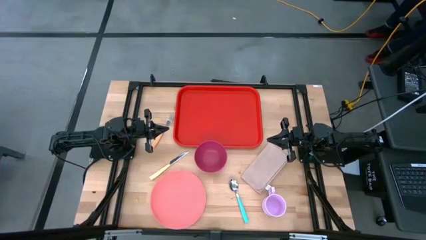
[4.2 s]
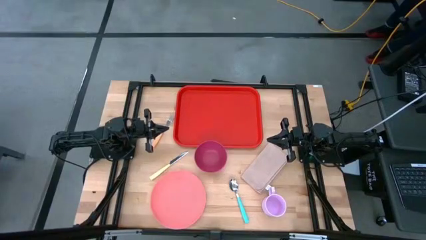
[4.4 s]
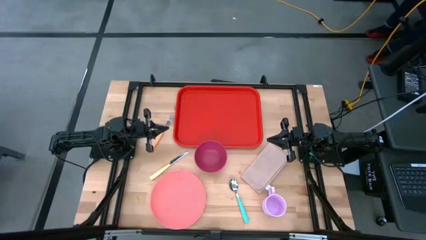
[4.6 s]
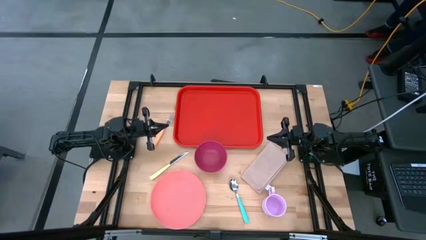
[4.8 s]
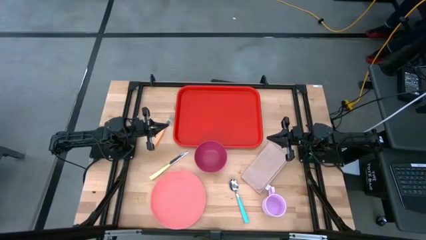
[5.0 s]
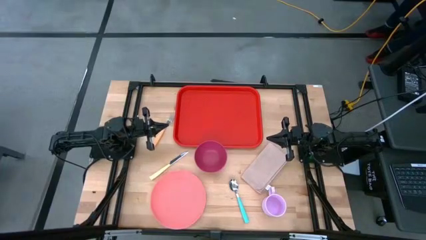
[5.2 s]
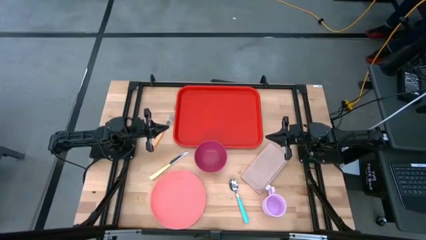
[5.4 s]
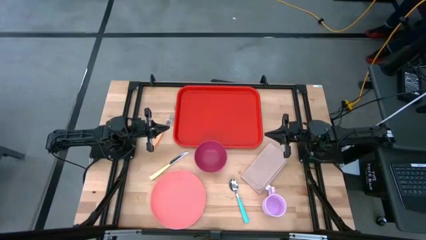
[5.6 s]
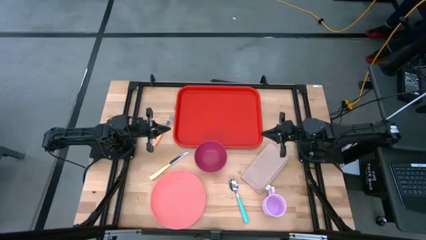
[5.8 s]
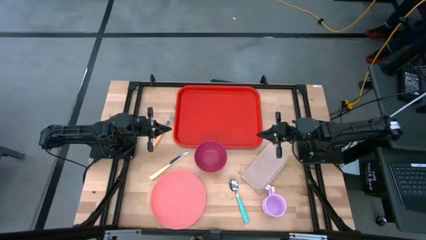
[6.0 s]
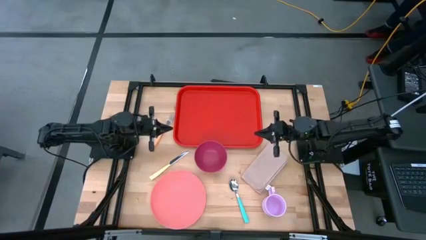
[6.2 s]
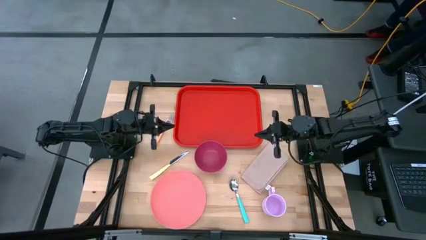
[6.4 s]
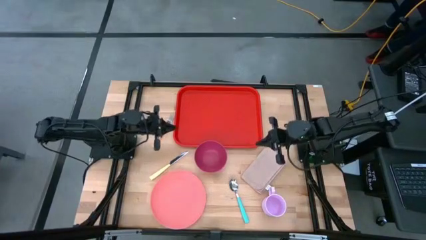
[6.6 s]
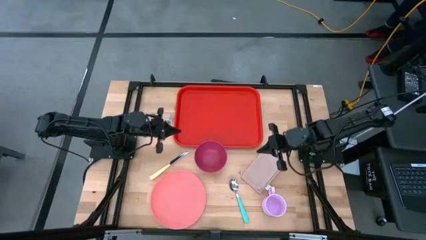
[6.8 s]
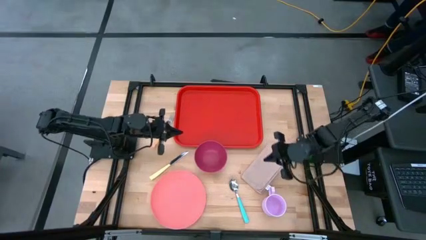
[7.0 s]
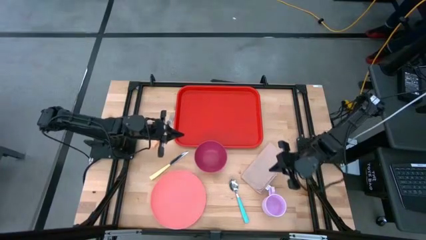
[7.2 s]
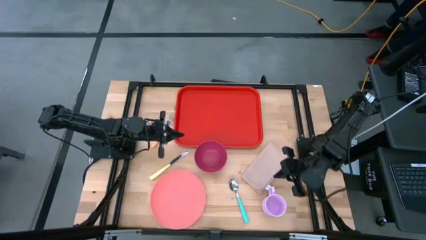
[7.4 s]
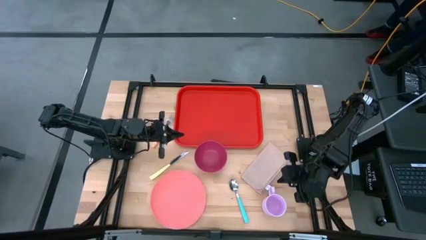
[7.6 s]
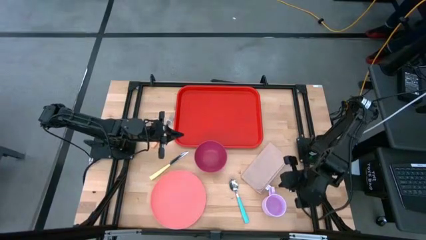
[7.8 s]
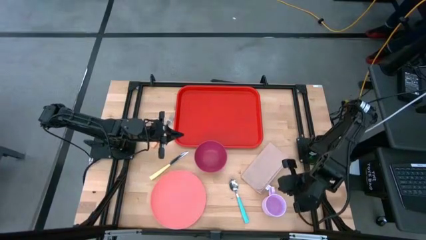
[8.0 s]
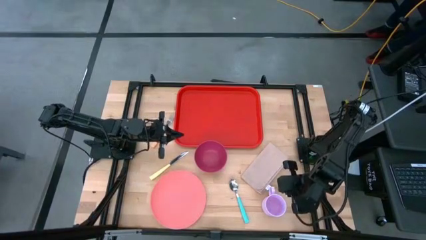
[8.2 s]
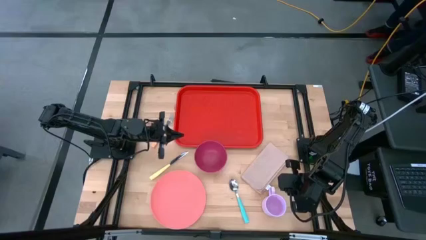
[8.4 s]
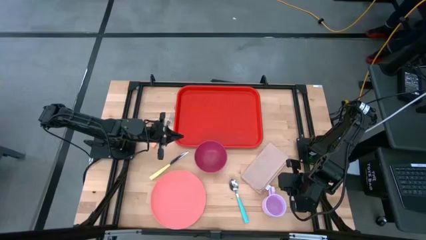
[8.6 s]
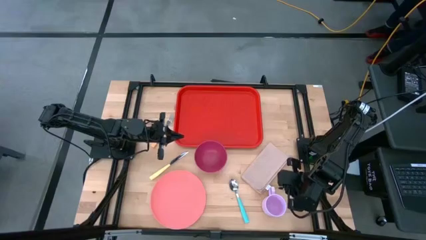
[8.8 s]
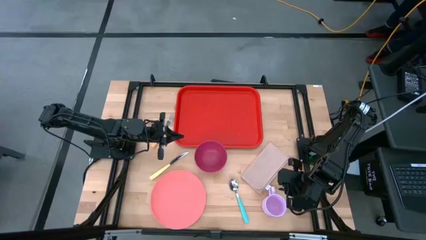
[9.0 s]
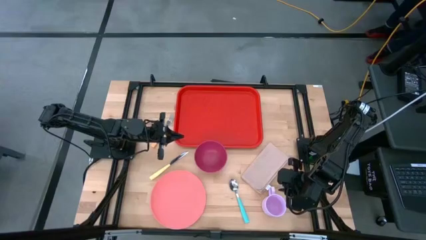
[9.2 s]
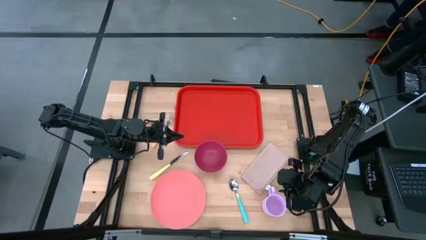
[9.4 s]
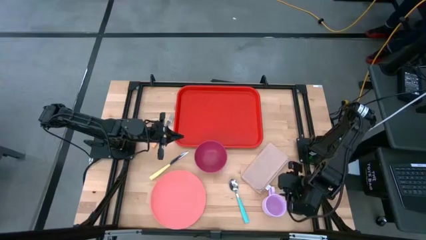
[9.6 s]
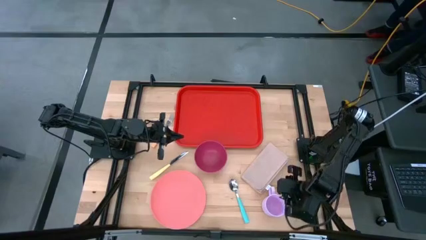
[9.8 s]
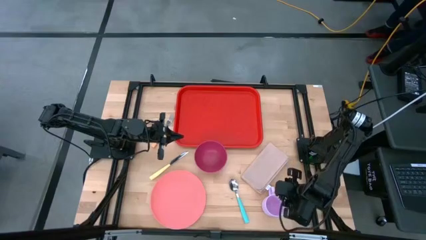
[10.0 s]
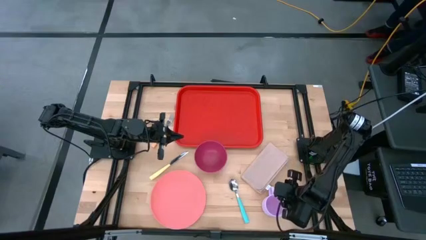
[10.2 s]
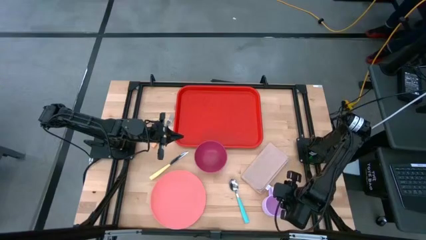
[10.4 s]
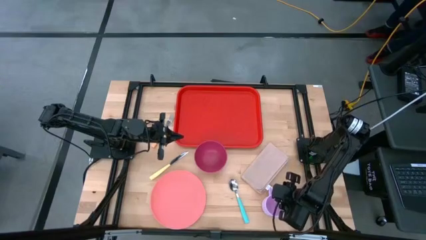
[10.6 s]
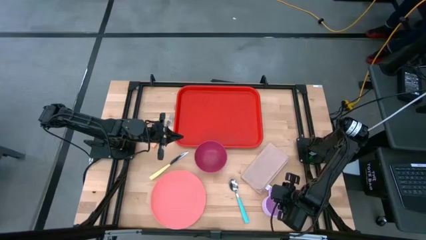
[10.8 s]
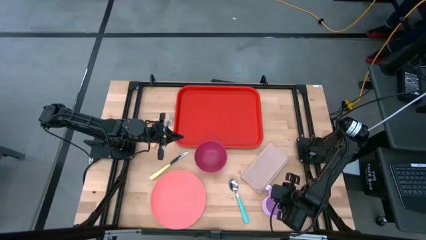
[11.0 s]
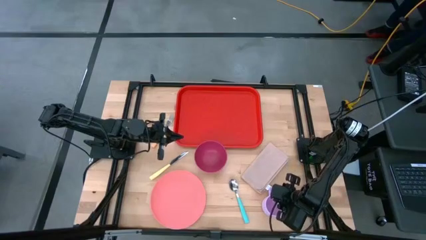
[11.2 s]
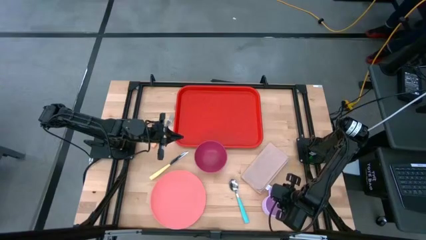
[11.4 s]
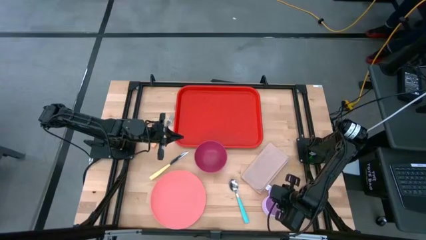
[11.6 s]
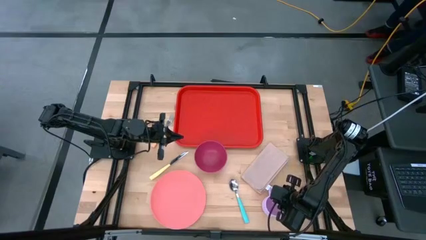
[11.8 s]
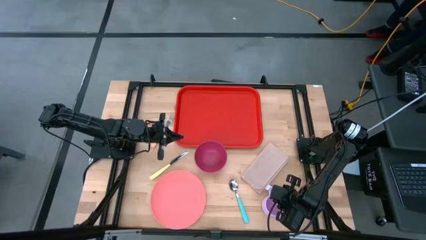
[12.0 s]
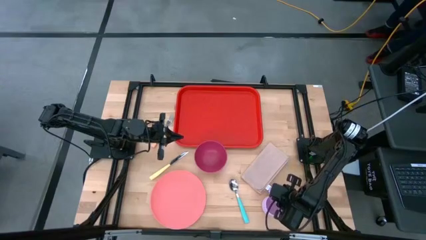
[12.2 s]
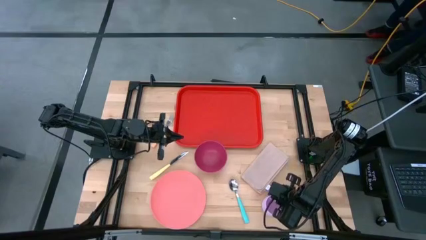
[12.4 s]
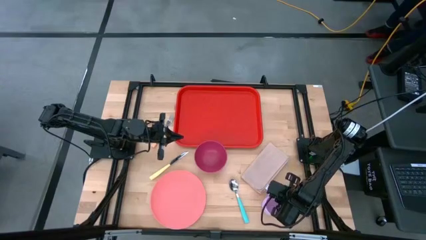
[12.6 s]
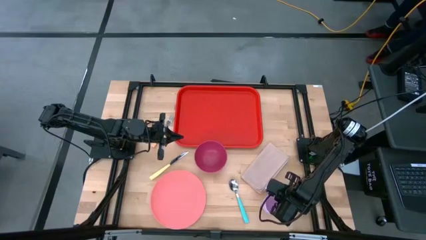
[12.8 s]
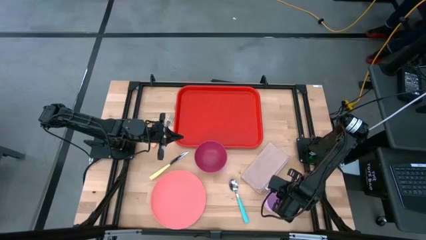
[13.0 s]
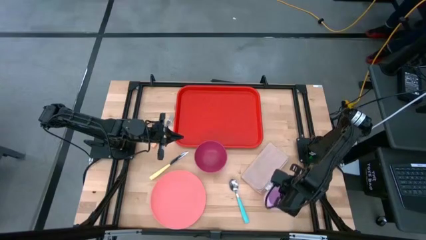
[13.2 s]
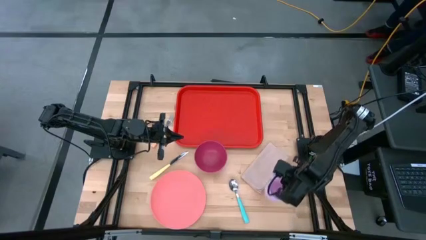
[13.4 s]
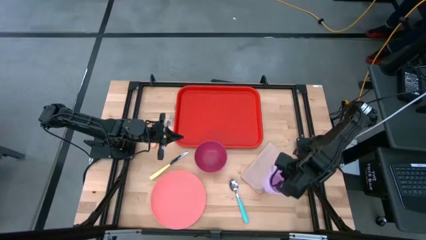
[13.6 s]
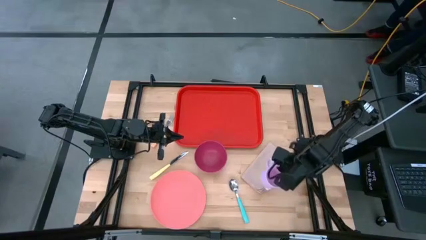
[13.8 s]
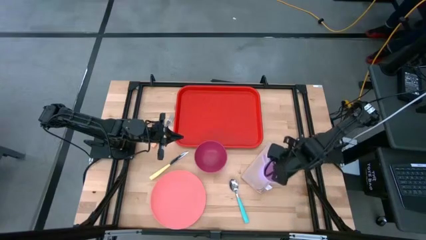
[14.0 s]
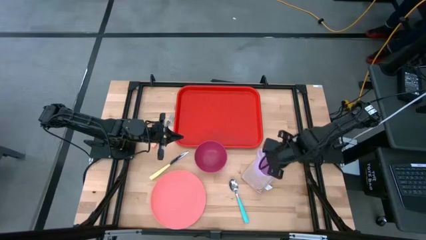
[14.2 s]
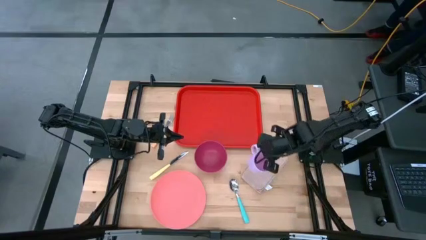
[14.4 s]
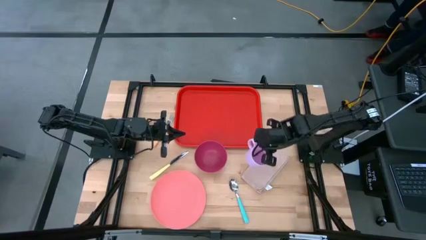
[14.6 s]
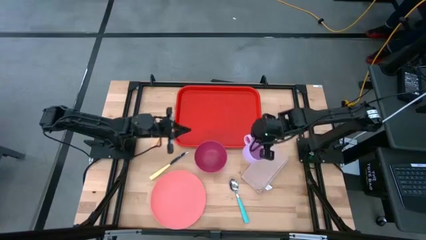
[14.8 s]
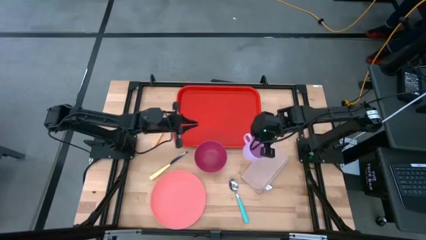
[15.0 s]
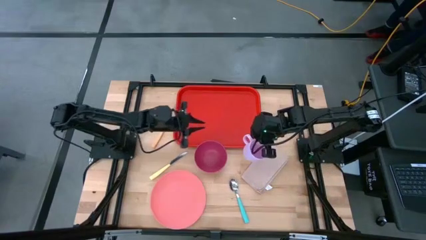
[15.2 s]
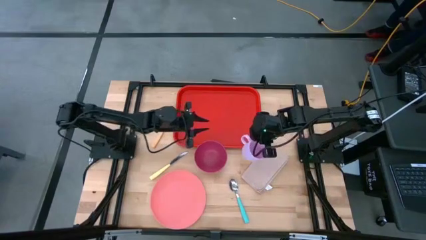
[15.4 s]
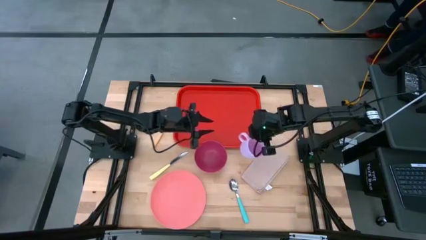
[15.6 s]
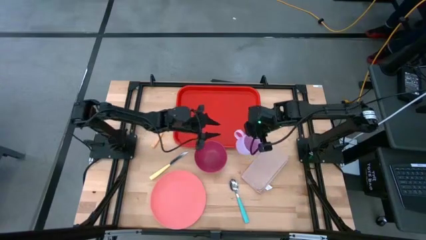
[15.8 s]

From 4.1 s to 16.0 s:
Task: Set up tray
Put the light purple mug on the red tray

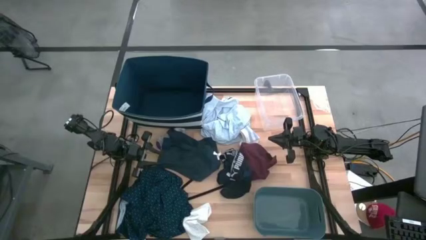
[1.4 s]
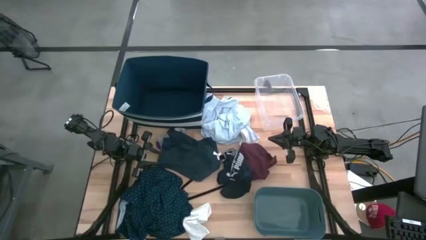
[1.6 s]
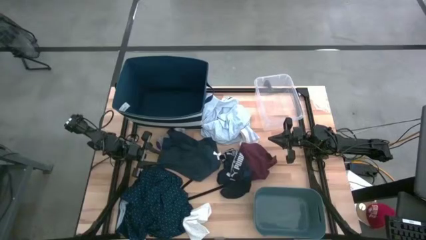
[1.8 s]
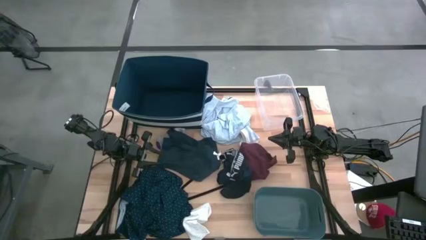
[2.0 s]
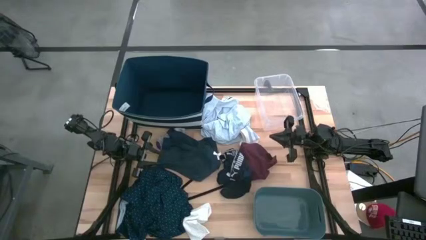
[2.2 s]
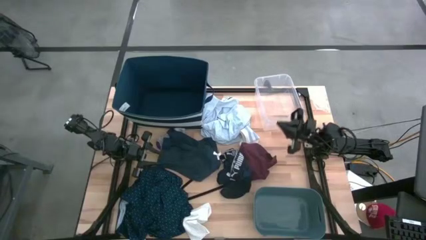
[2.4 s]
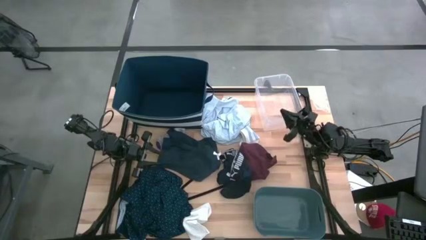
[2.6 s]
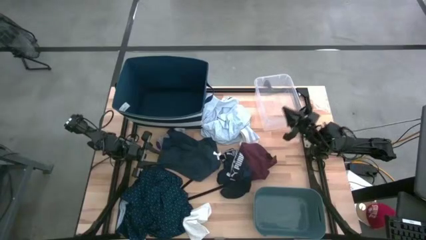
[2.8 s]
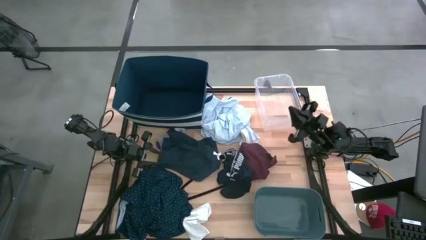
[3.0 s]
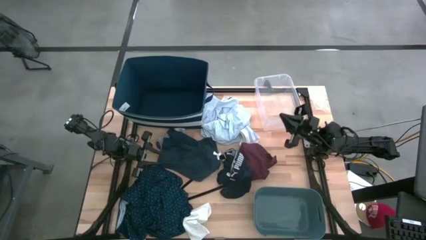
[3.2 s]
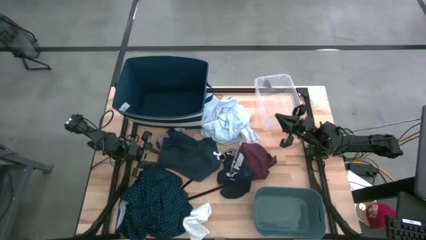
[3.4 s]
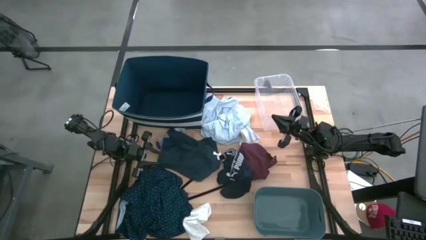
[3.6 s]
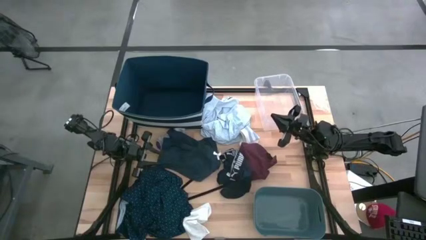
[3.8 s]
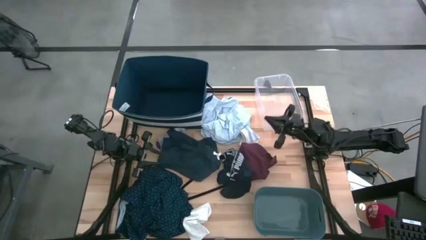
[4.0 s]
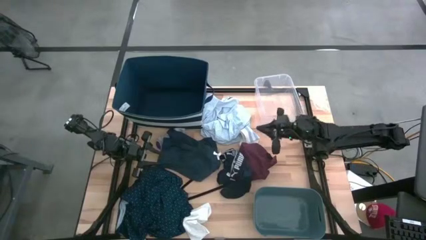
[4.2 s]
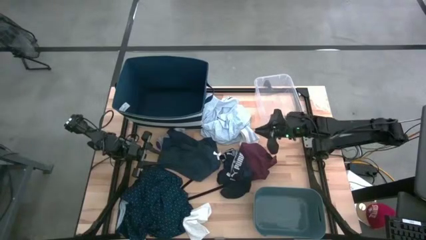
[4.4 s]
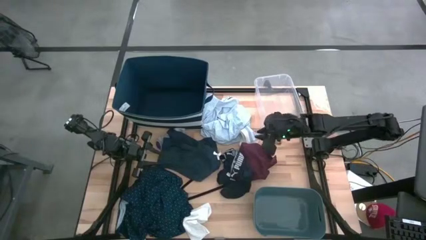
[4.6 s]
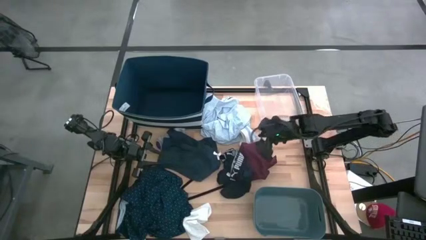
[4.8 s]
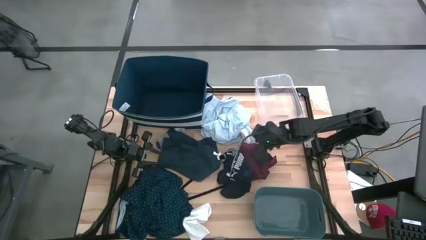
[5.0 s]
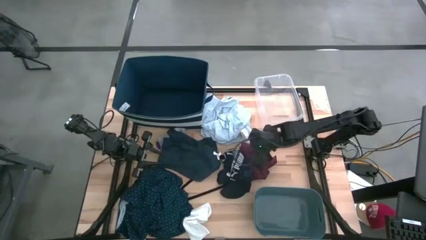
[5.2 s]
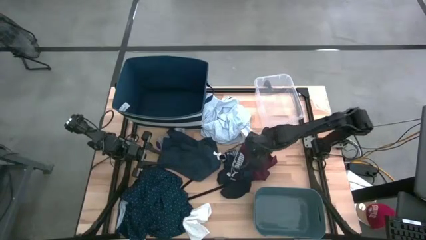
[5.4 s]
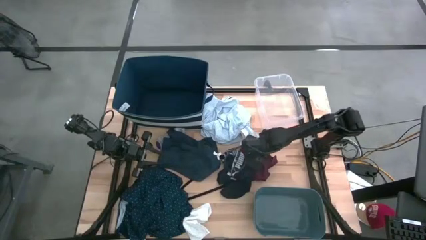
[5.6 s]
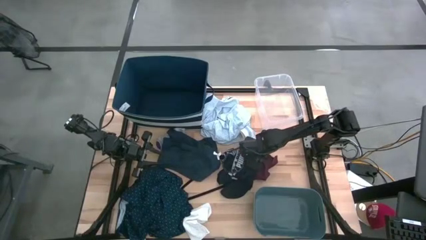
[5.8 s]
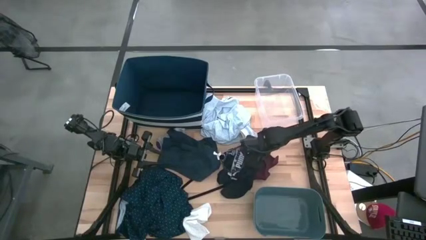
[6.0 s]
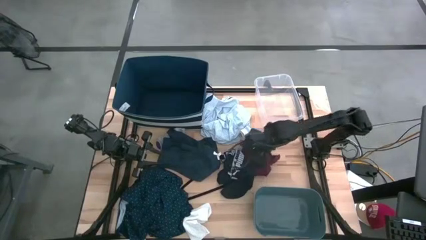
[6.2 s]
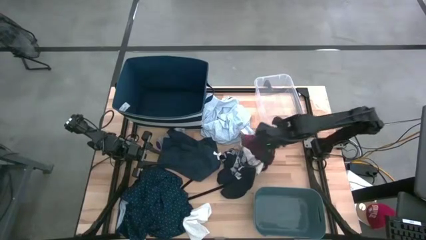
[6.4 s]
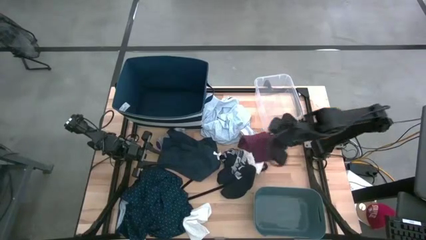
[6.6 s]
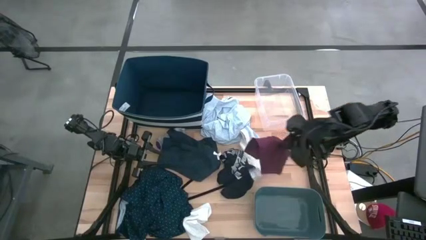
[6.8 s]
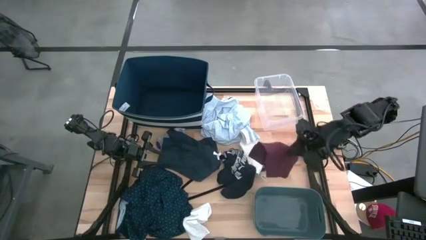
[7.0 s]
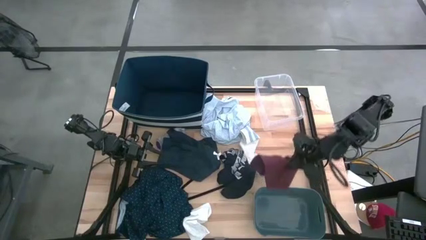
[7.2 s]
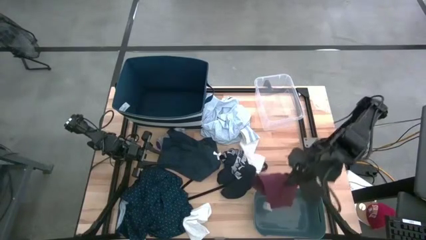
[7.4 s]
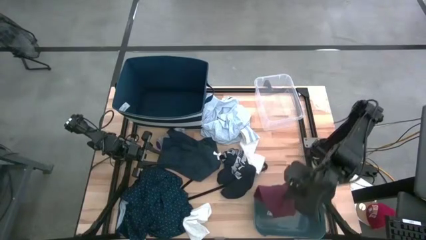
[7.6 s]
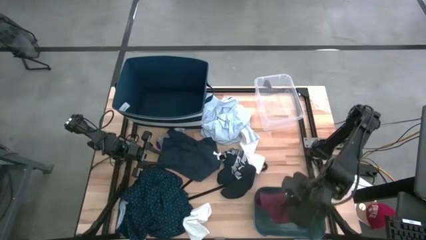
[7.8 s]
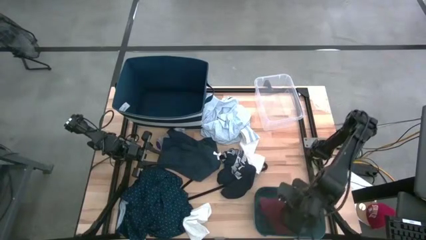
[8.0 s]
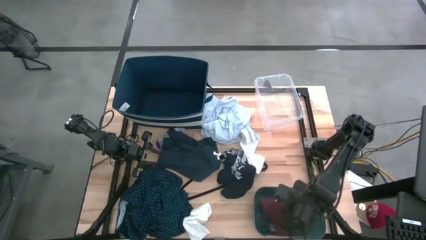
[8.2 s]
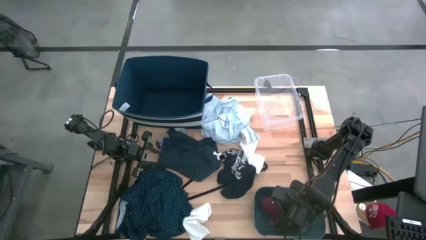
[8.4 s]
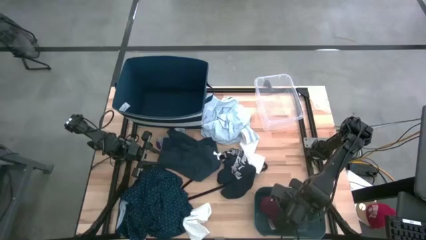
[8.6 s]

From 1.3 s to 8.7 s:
Task: Pick & Place Cloths
Put the red underwear into the green bin
